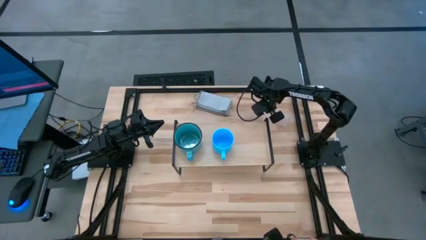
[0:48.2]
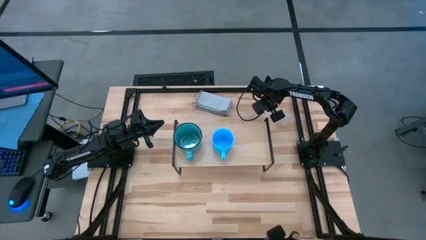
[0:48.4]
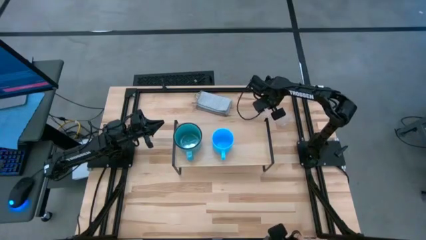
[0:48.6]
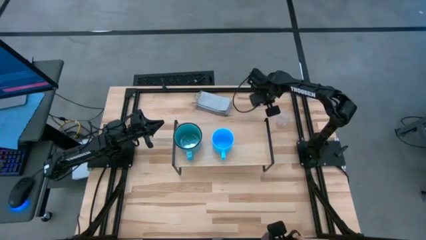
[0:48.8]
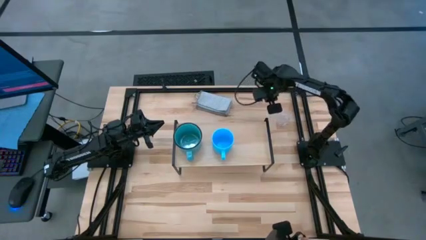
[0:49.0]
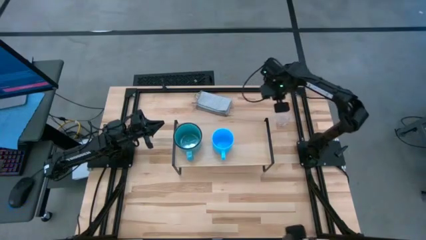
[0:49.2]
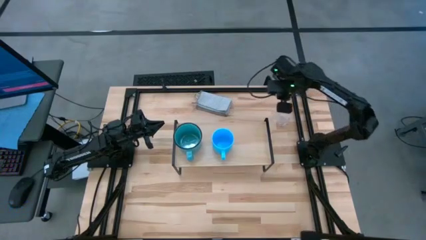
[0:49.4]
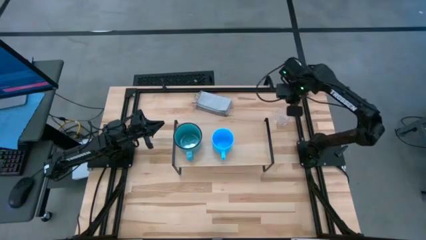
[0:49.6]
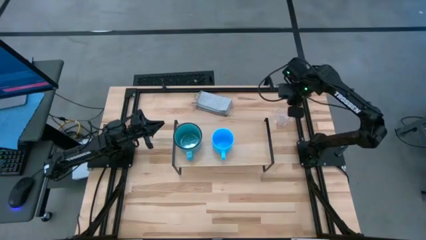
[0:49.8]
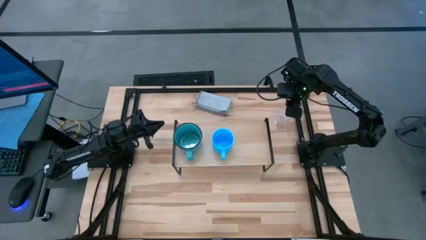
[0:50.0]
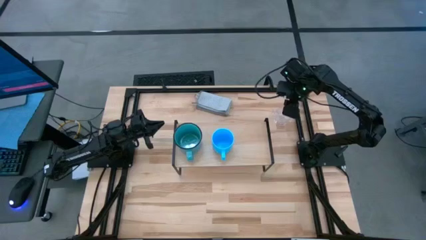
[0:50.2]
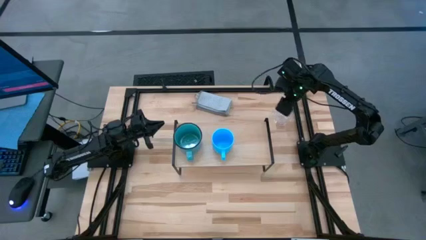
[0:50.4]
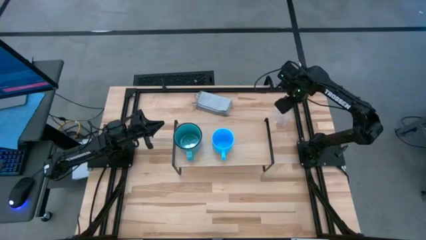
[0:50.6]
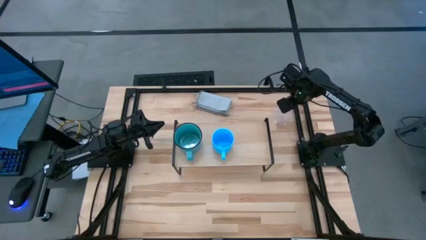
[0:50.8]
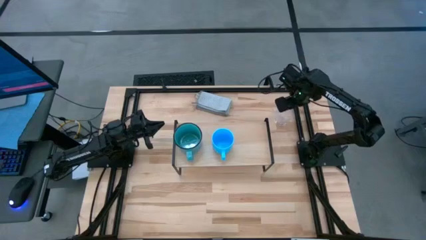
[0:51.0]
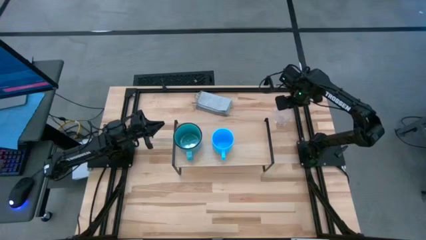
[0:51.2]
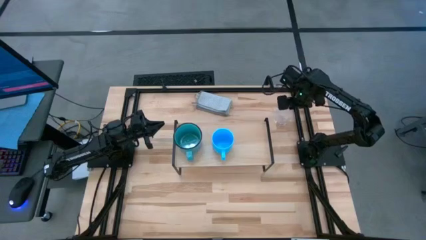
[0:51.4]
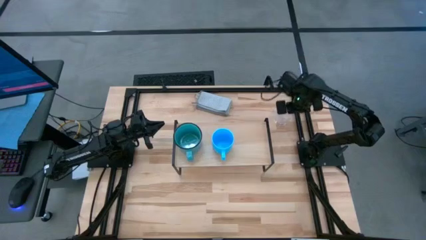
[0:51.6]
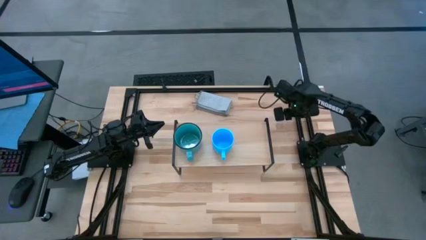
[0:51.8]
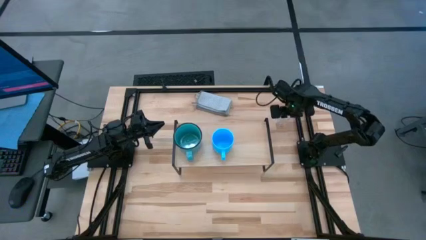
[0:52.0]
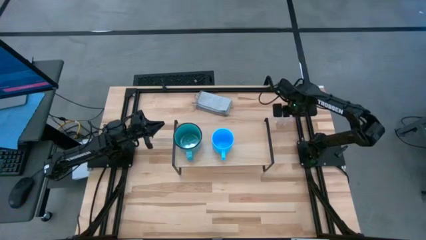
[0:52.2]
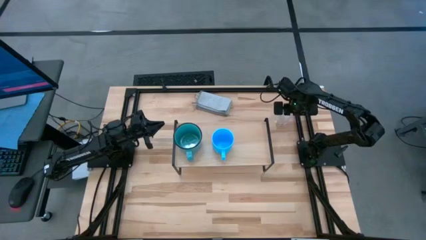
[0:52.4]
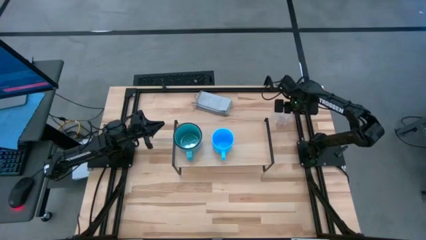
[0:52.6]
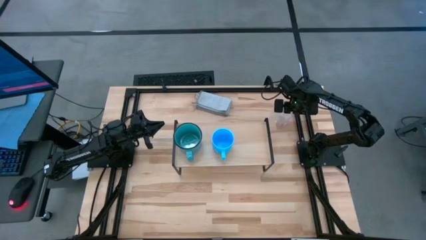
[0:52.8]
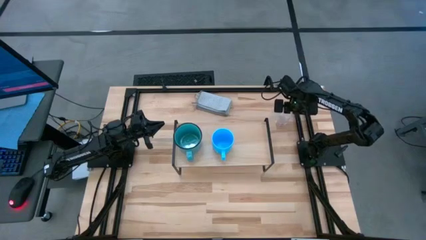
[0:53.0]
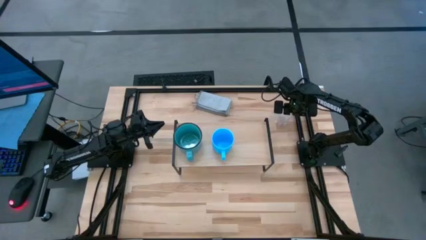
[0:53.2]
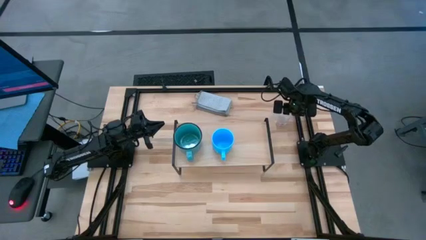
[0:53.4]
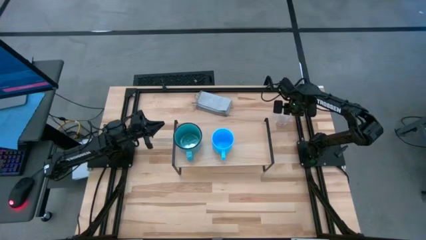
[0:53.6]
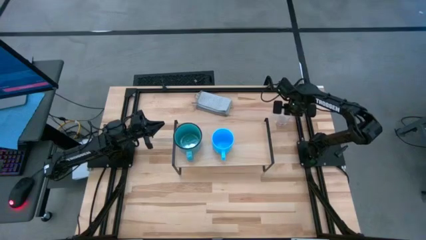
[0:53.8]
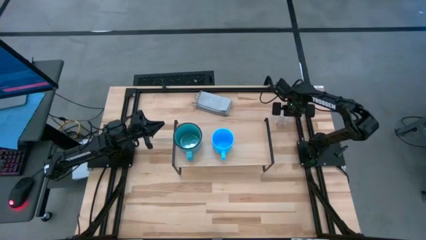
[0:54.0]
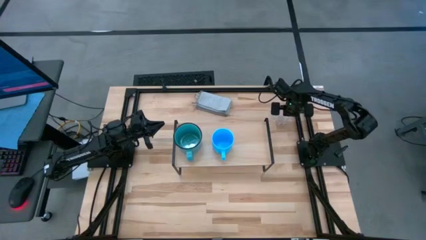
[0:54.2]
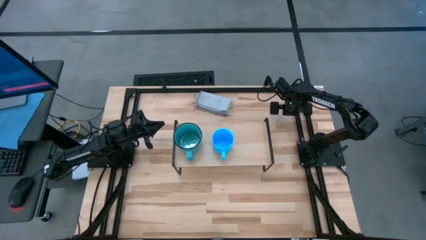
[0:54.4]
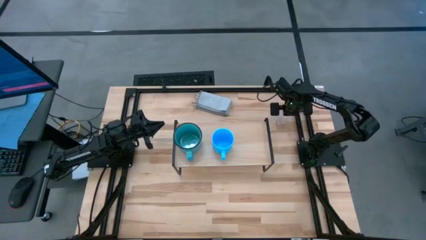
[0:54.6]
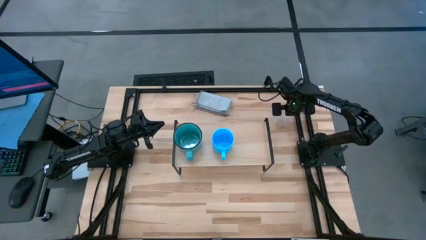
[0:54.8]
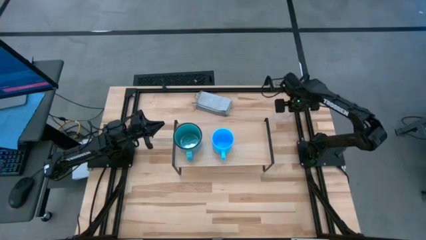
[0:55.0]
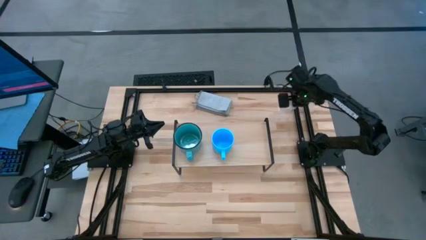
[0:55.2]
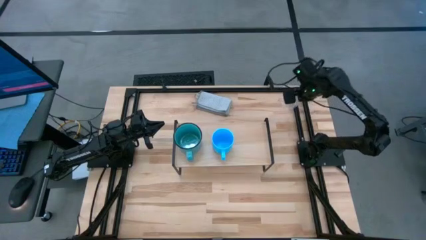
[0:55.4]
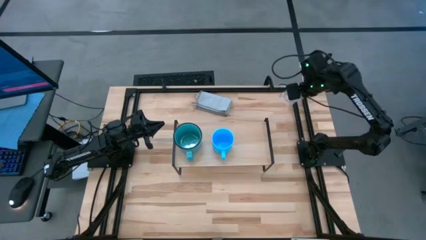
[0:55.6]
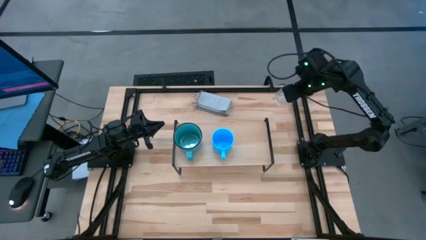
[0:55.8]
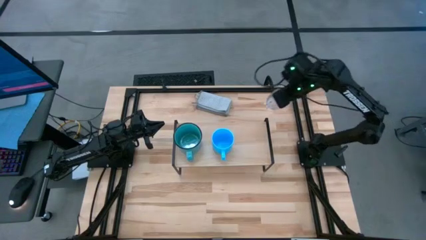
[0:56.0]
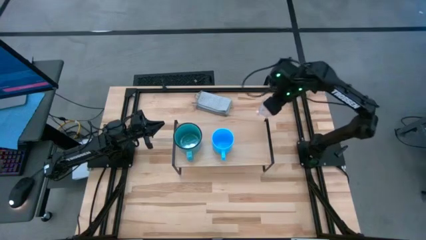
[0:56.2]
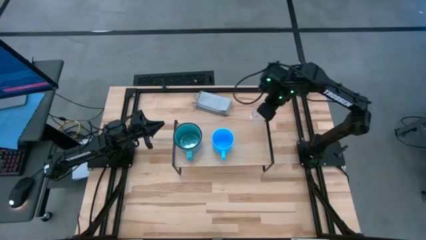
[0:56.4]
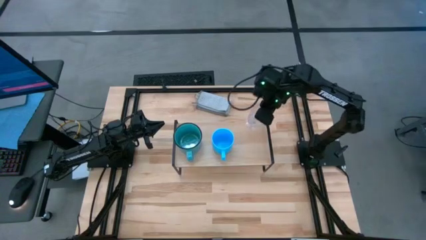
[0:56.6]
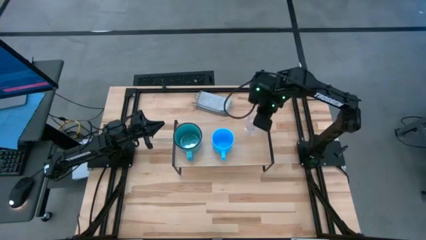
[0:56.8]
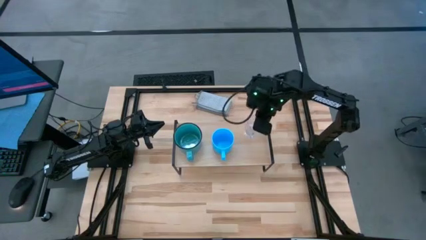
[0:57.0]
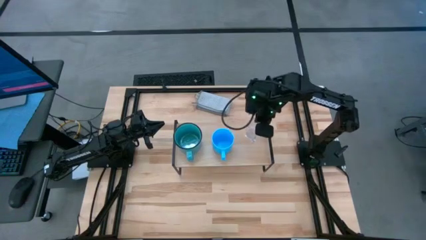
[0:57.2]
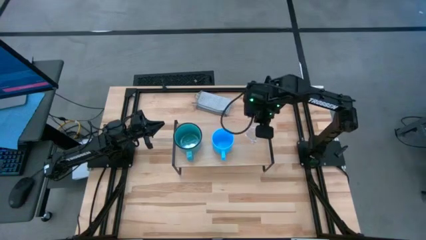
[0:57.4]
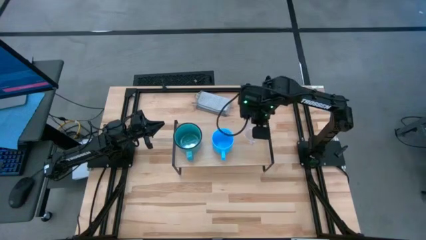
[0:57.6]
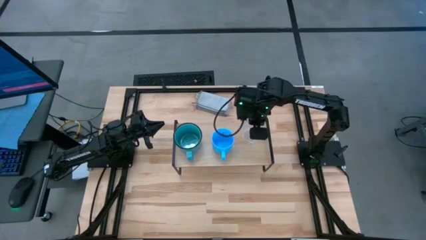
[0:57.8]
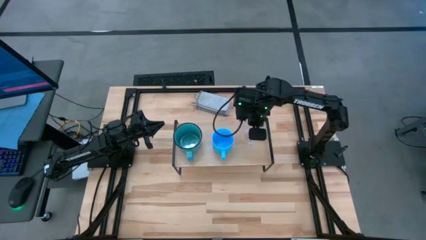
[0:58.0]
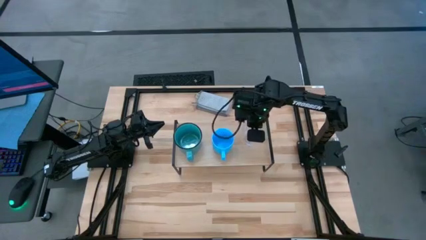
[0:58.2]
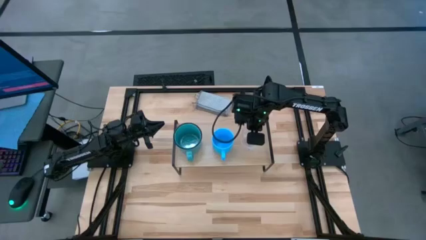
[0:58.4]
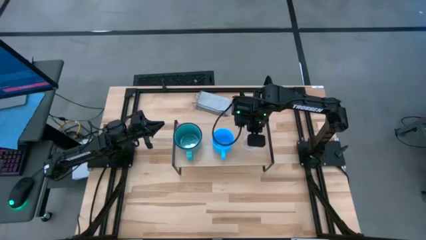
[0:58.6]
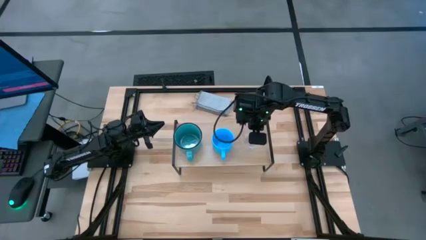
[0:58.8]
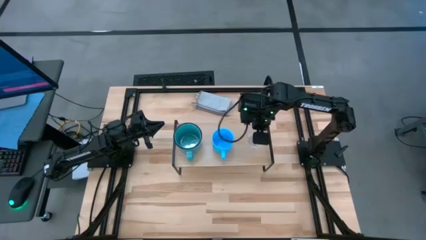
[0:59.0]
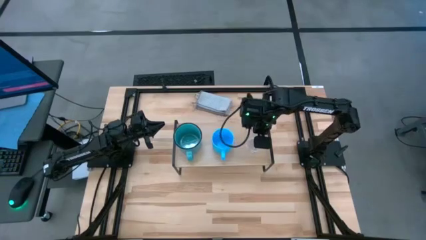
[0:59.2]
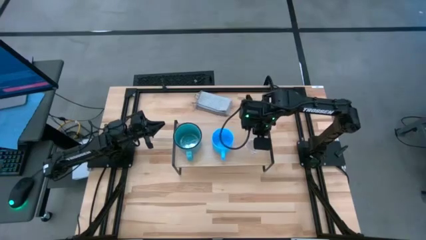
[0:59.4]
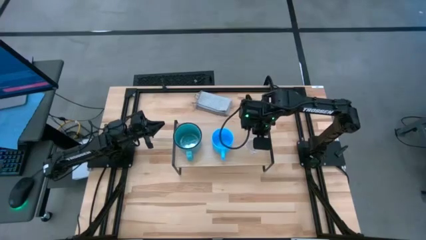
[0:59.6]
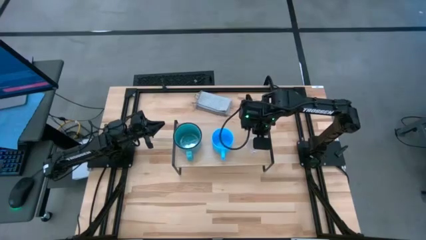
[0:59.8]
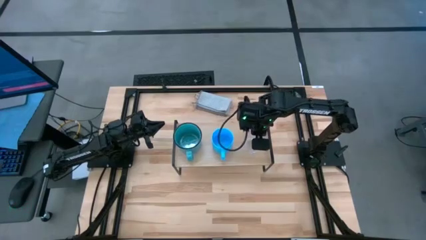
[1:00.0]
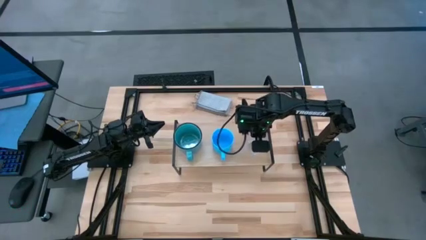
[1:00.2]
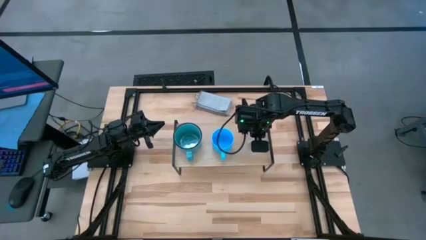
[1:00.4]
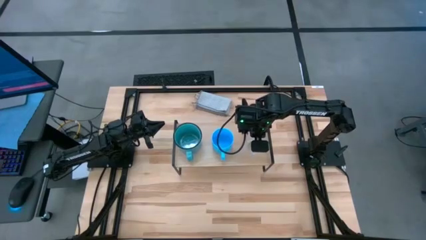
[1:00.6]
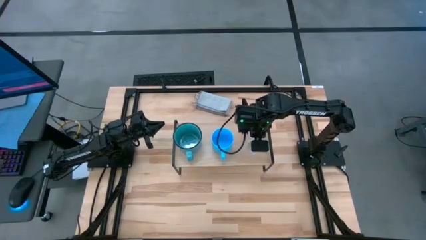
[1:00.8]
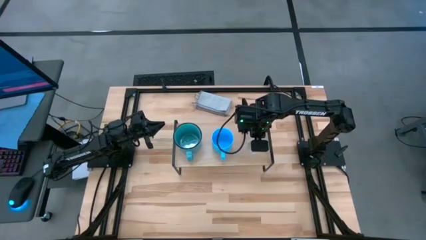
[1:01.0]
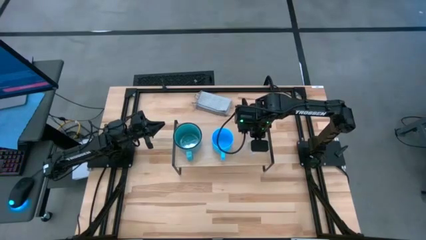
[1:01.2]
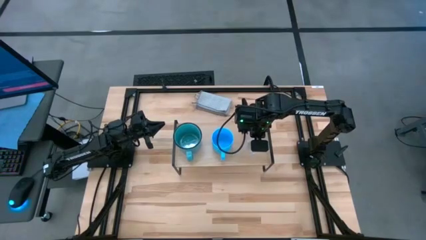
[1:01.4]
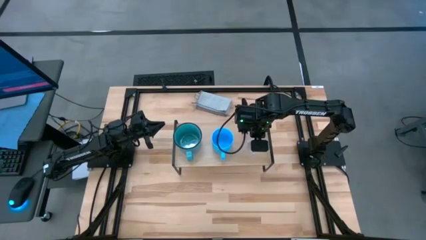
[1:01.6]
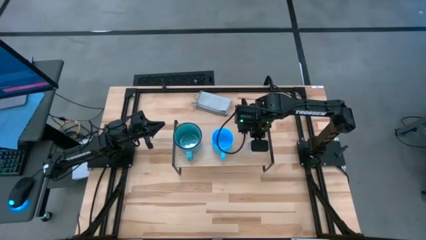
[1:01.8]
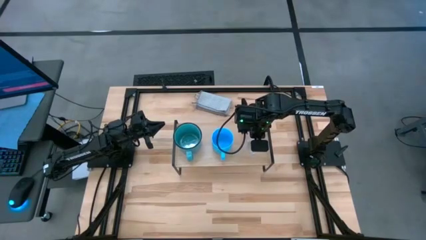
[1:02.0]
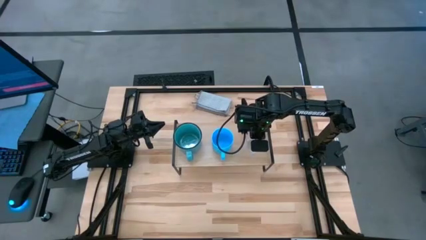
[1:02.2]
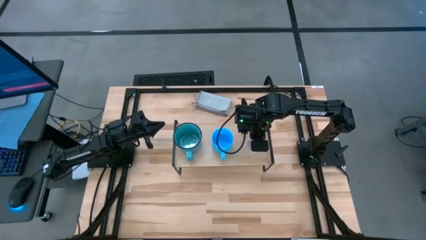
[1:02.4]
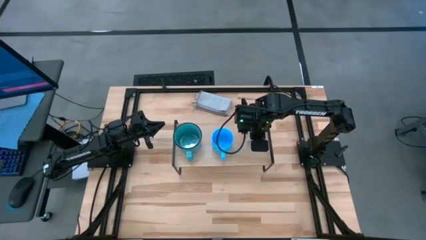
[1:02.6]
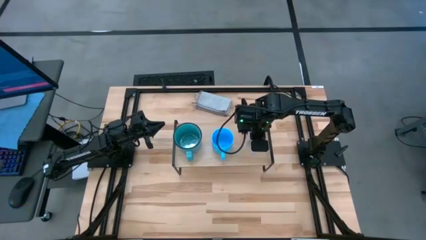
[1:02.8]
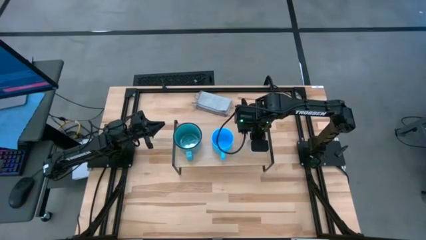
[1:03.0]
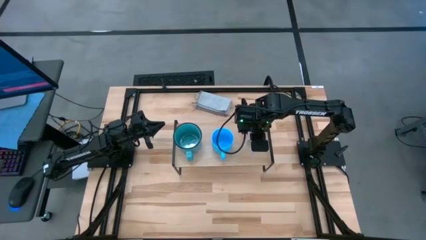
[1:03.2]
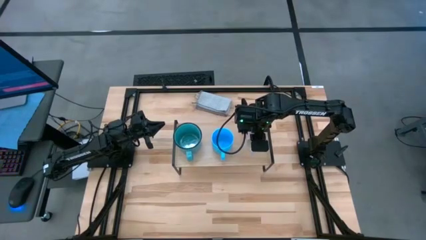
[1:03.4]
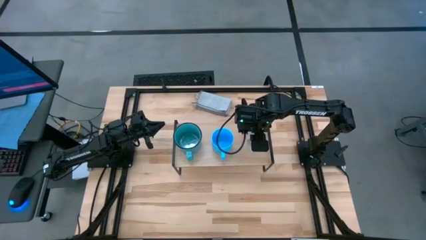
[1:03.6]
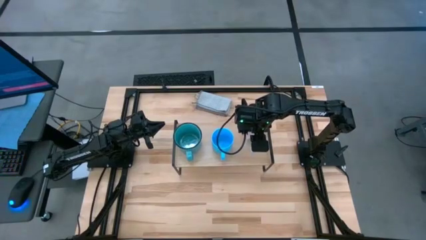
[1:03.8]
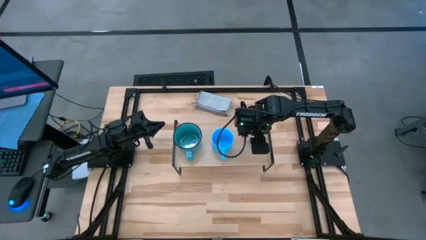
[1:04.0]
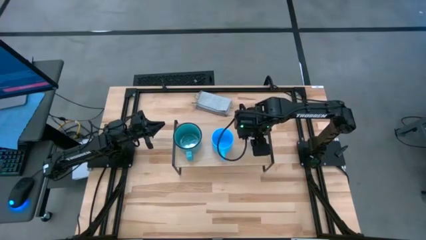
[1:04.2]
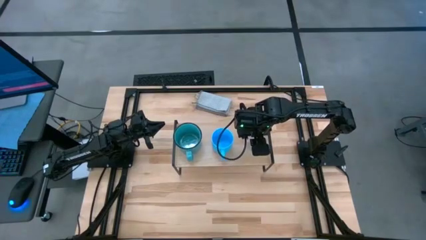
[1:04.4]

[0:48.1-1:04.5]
Task: Stack small to large cups/mugs on shelf
Put the transparent mug on the shelf
